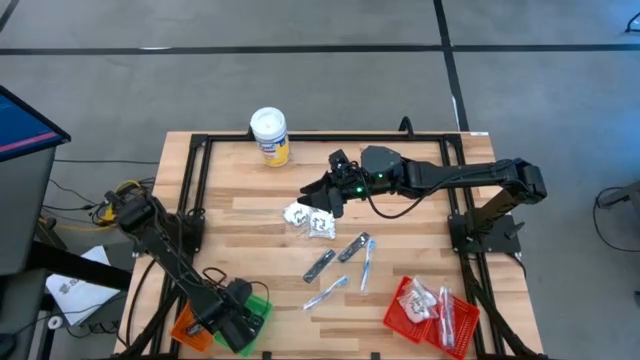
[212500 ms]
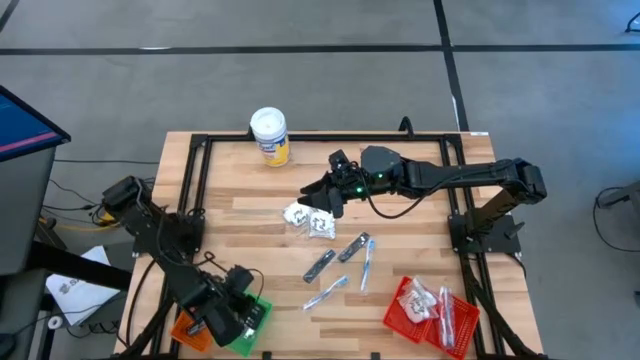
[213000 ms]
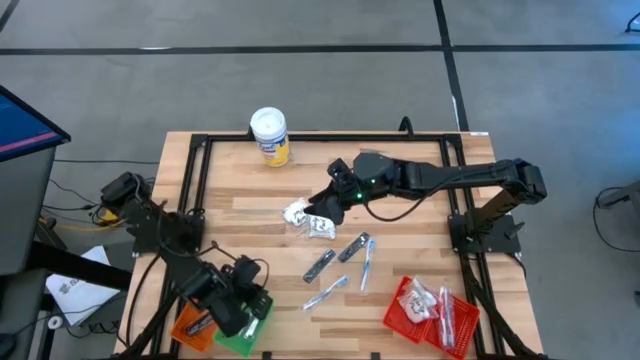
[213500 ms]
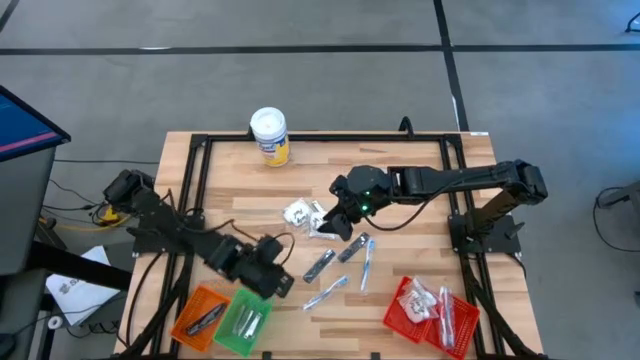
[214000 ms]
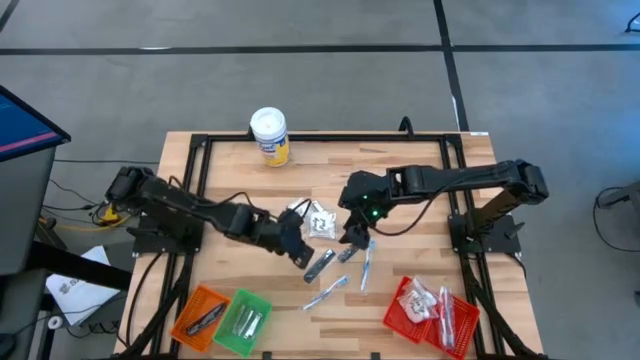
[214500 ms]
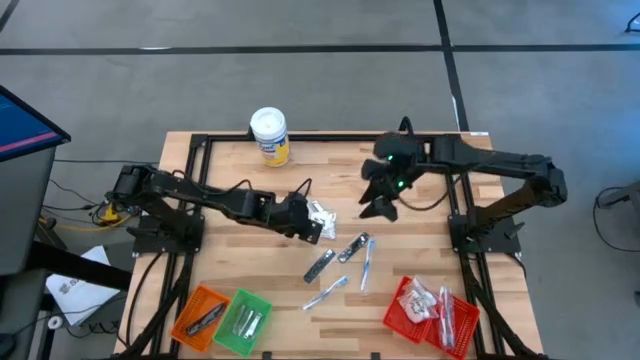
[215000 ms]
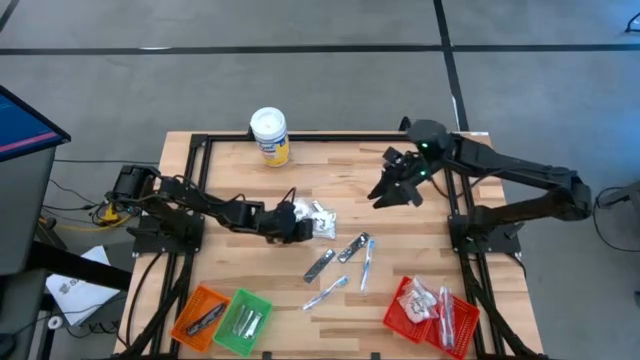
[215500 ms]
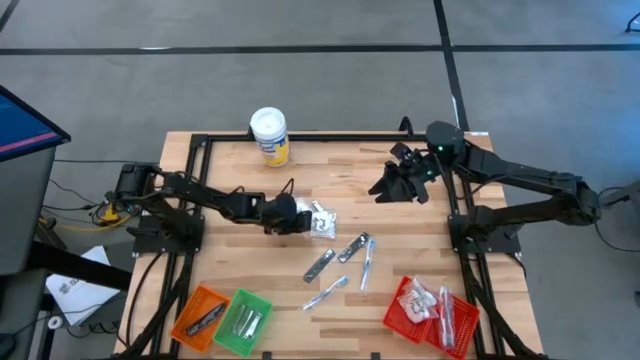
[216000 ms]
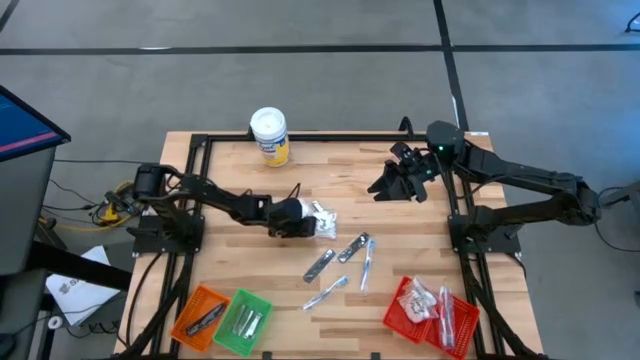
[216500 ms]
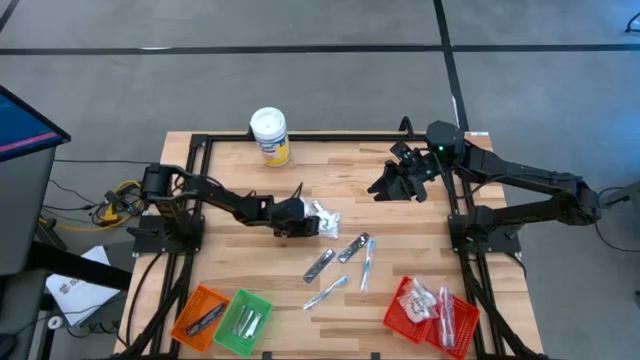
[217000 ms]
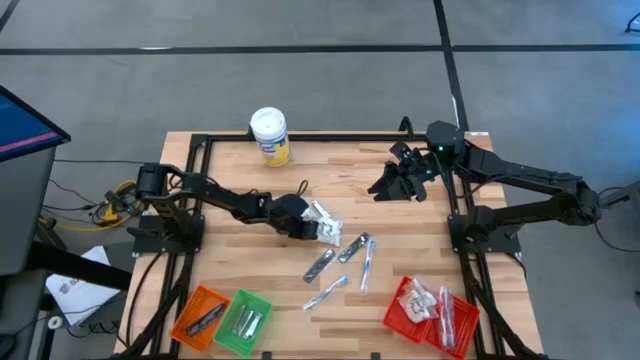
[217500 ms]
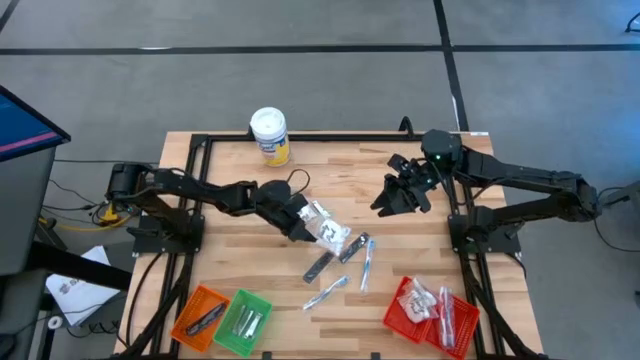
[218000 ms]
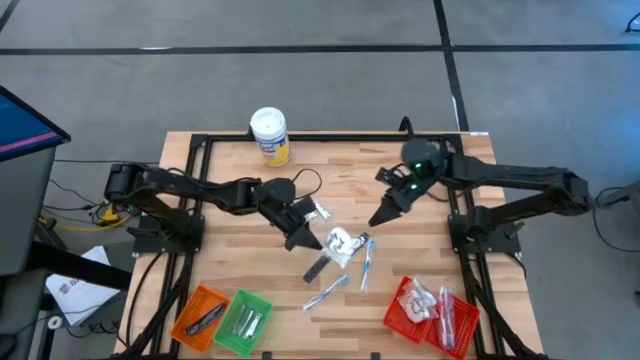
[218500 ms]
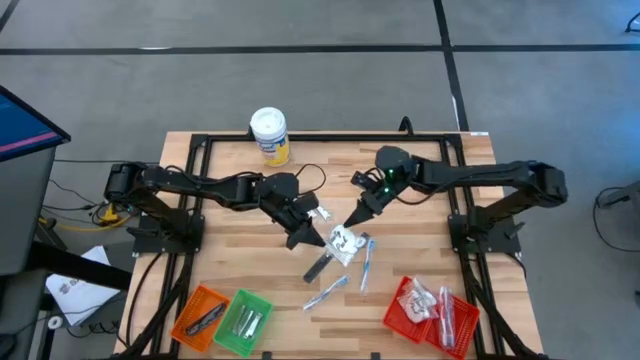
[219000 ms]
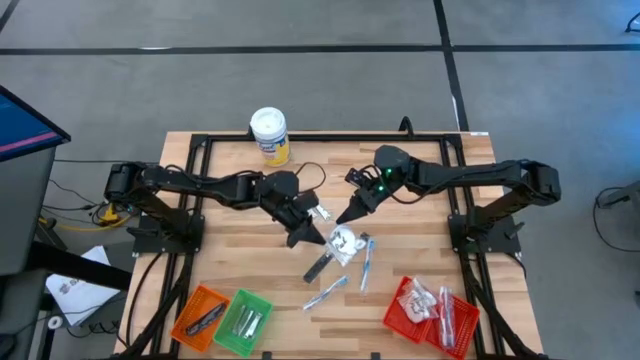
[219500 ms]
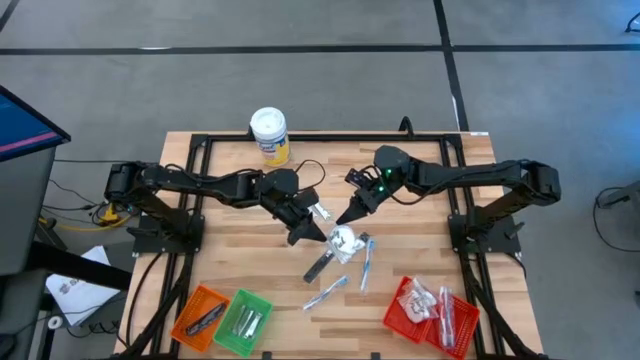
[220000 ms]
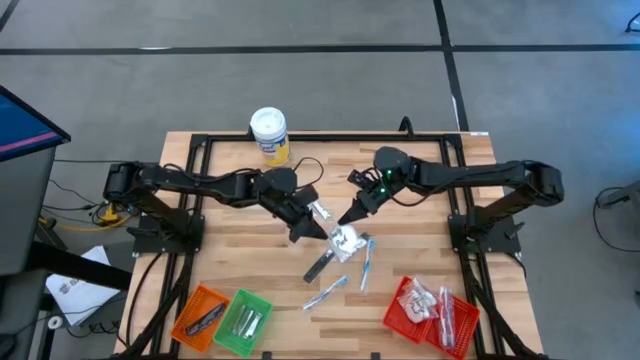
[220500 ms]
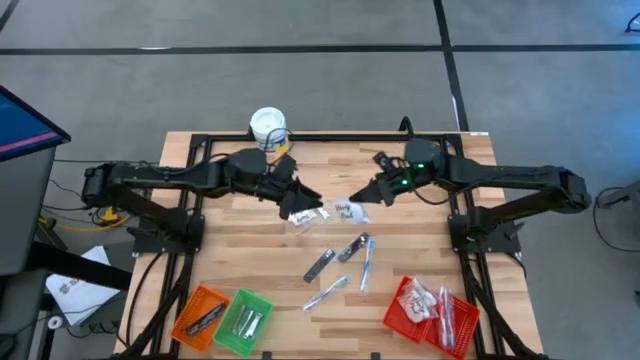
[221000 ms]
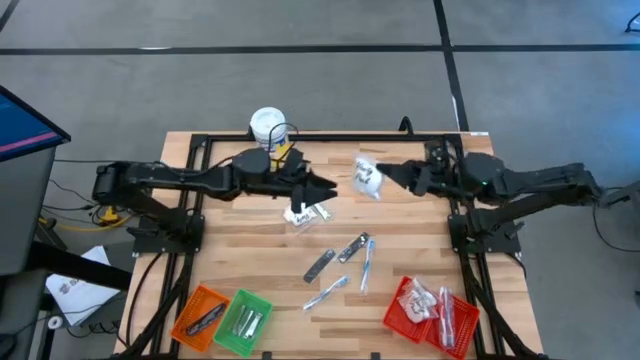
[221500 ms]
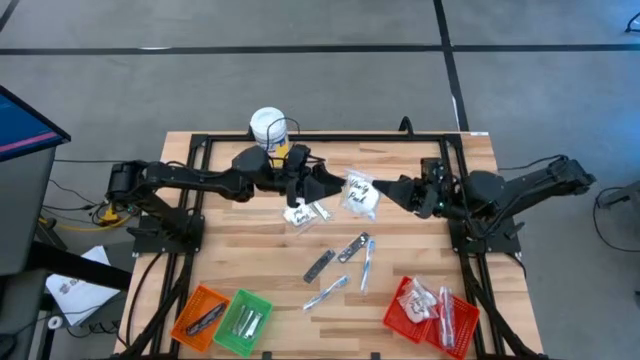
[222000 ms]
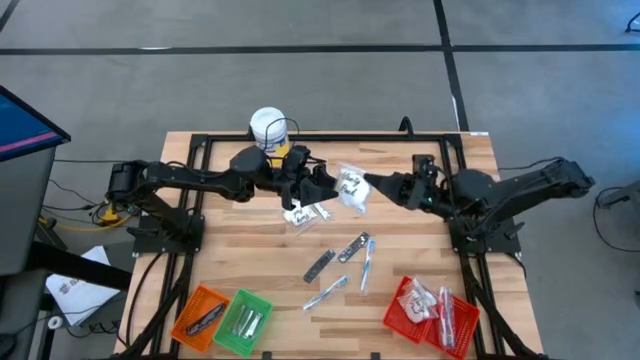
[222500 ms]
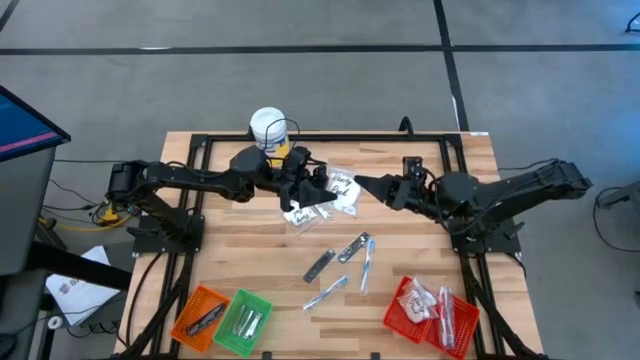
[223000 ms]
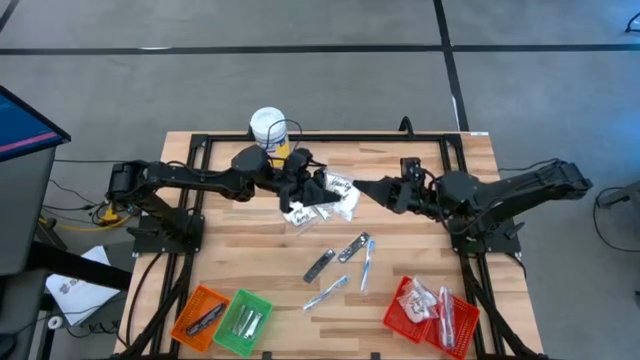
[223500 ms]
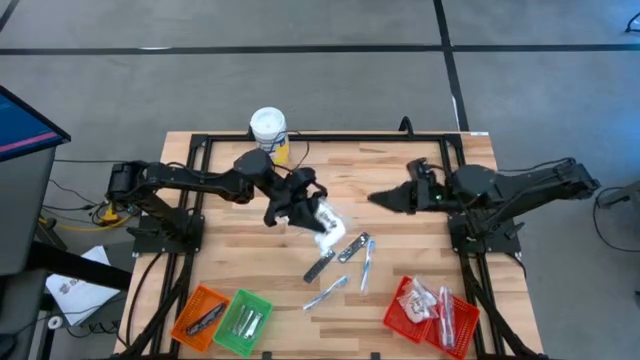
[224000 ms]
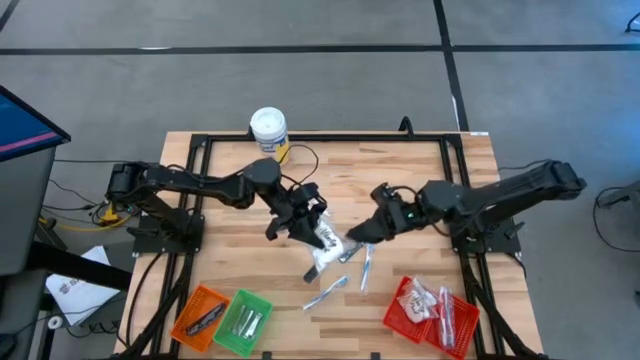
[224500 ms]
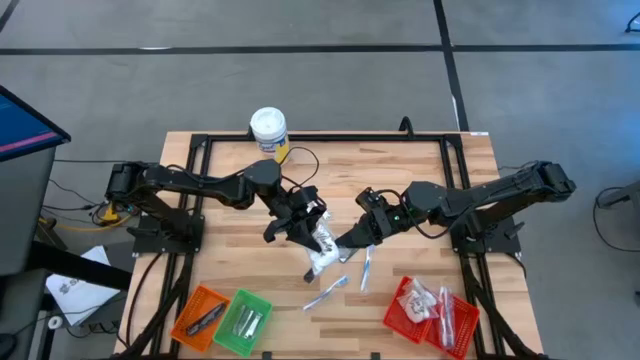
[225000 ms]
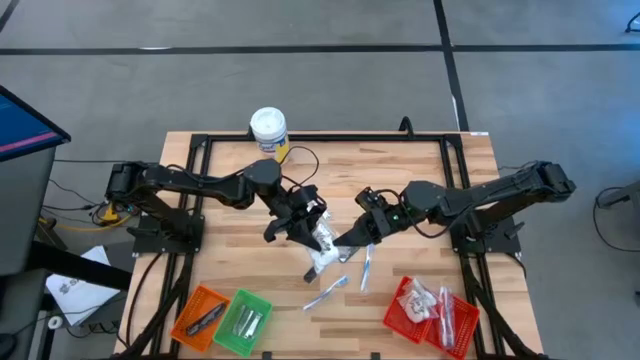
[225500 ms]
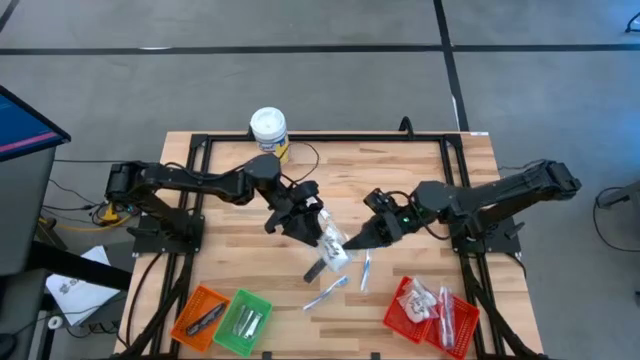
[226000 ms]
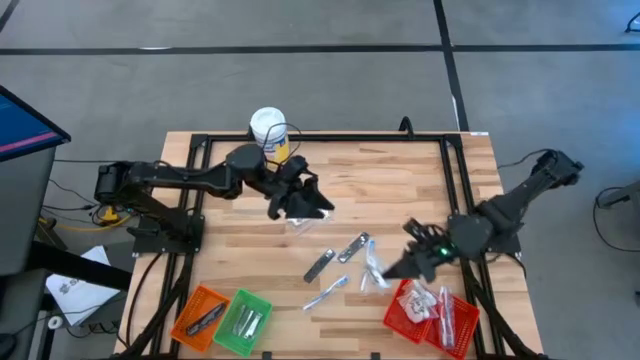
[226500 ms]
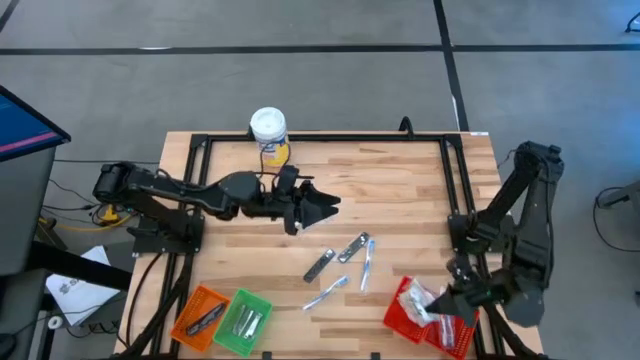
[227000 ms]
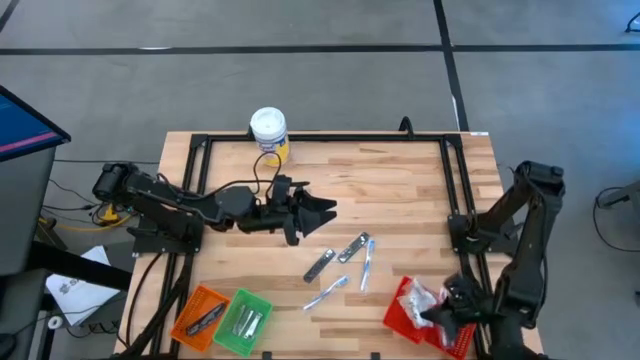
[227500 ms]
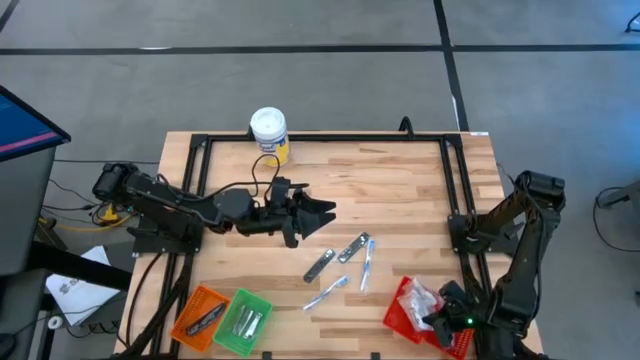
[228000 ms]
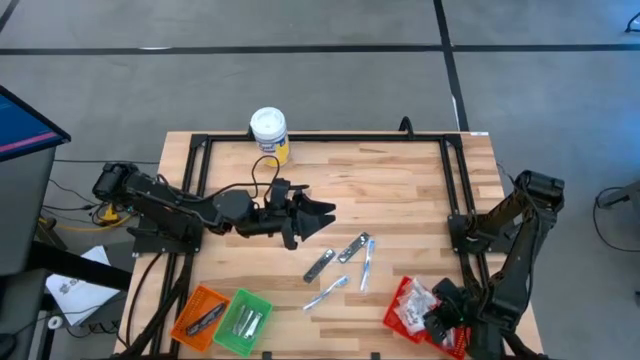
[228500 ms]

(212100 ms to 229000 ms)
Task: Pick & Place Travel size toiletries
Put the cotton pods into the left red basket
